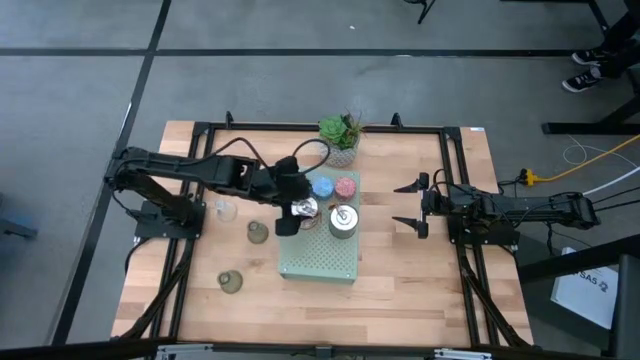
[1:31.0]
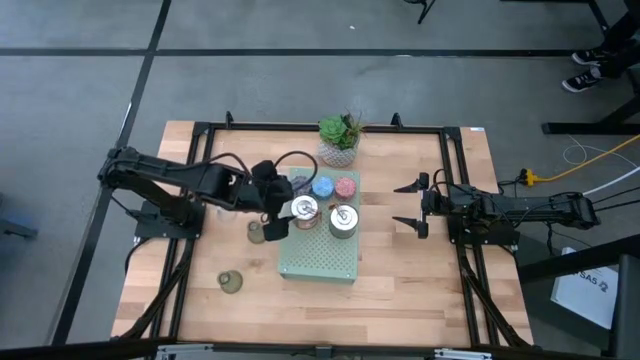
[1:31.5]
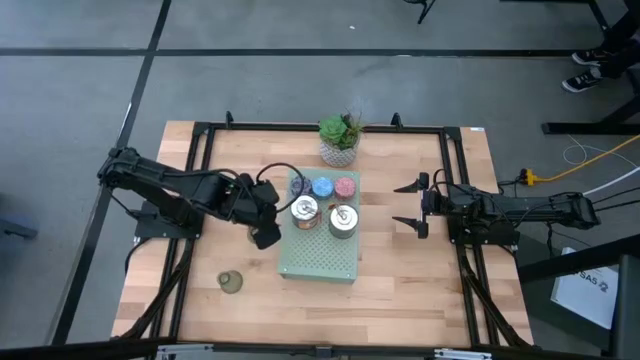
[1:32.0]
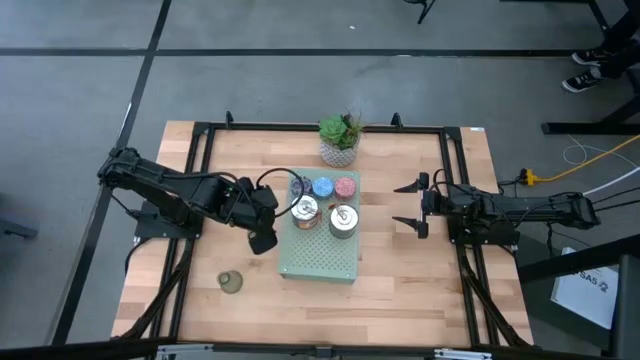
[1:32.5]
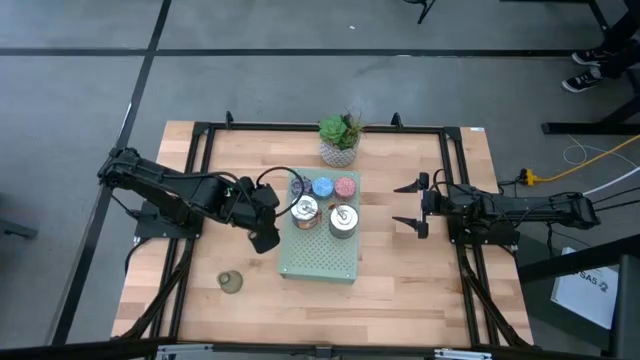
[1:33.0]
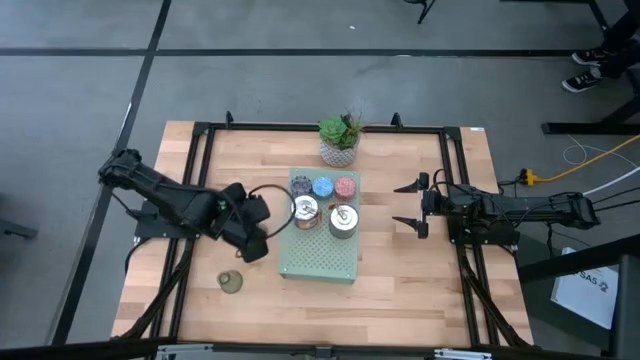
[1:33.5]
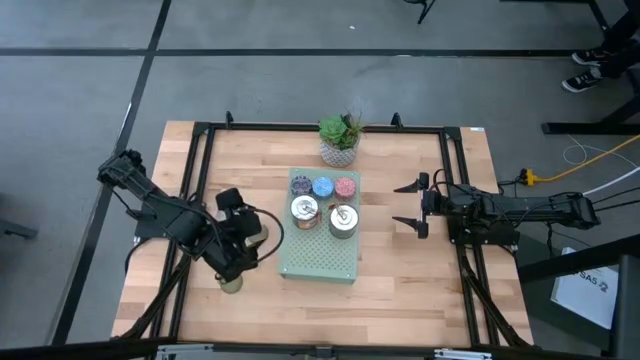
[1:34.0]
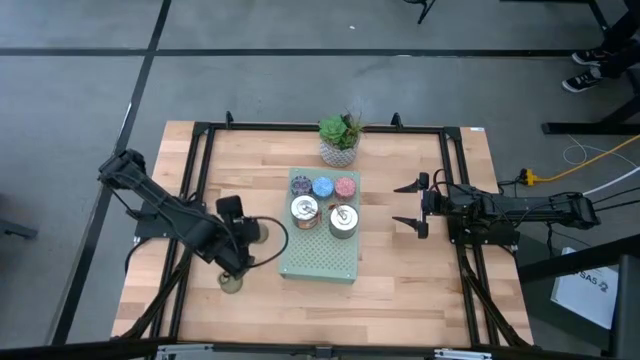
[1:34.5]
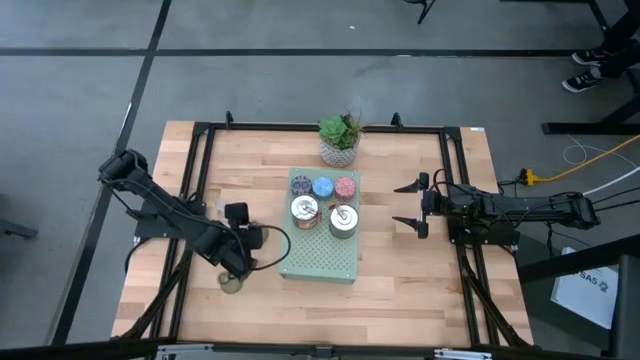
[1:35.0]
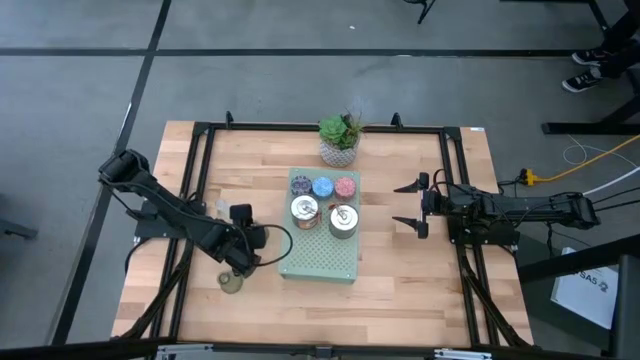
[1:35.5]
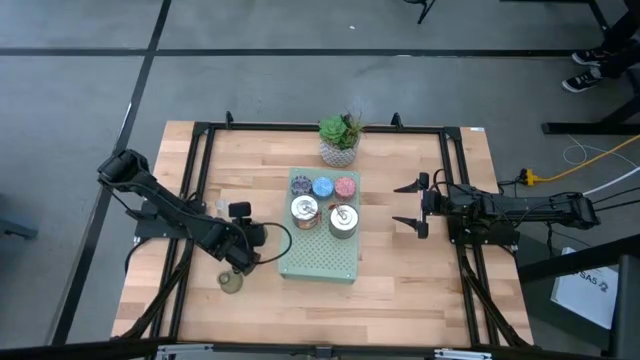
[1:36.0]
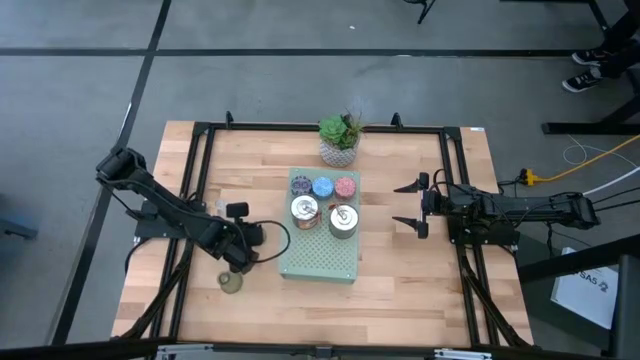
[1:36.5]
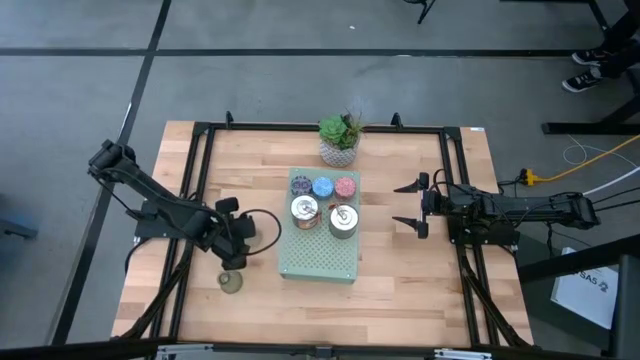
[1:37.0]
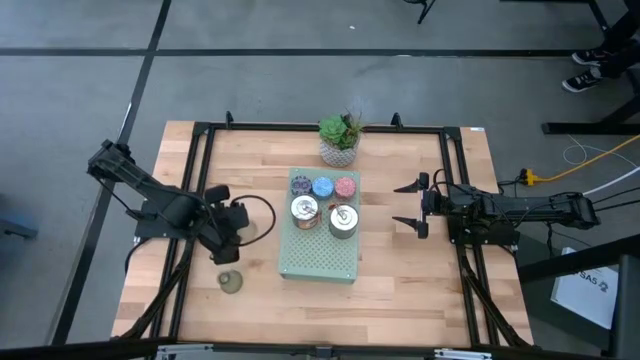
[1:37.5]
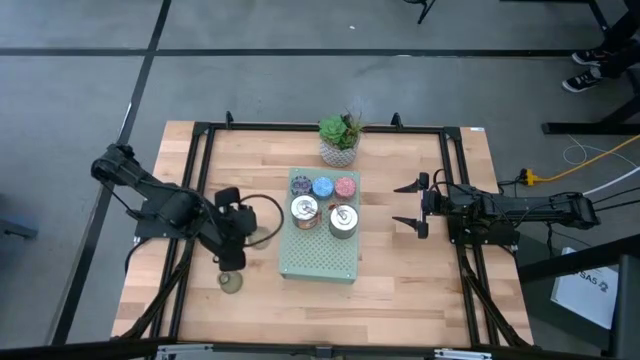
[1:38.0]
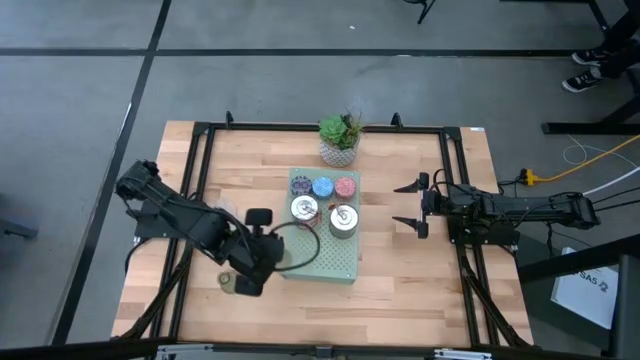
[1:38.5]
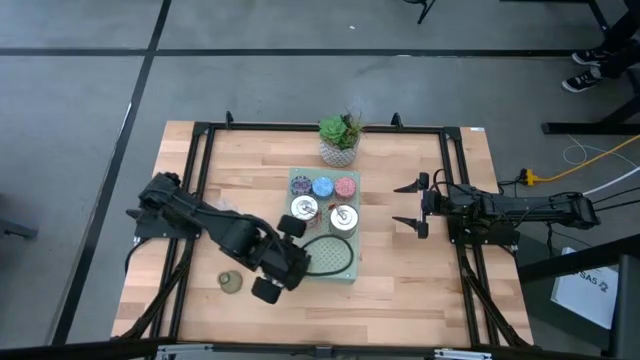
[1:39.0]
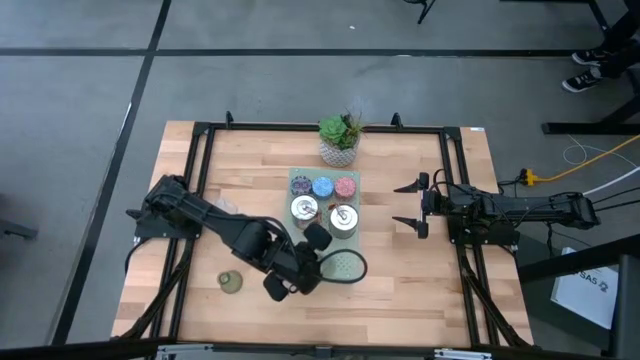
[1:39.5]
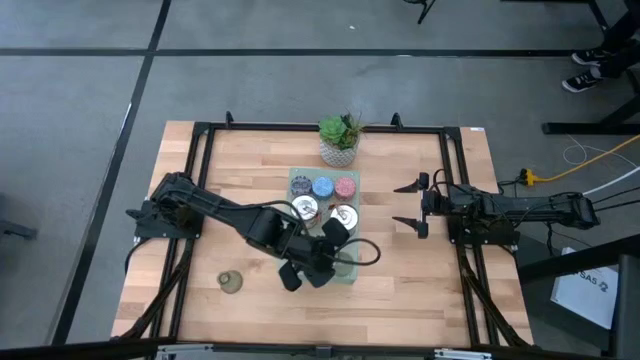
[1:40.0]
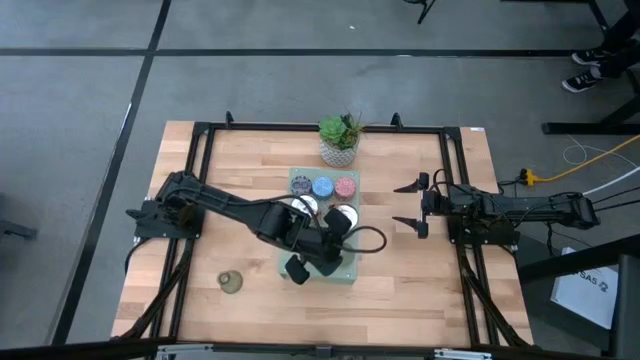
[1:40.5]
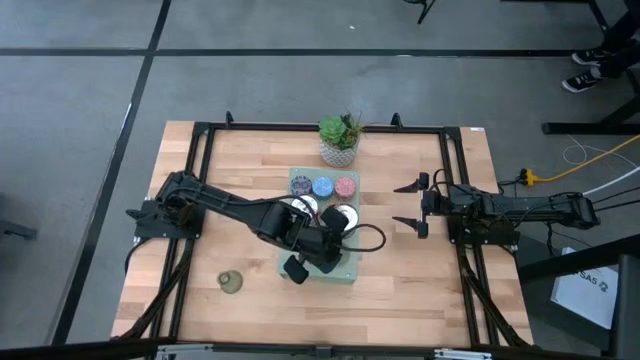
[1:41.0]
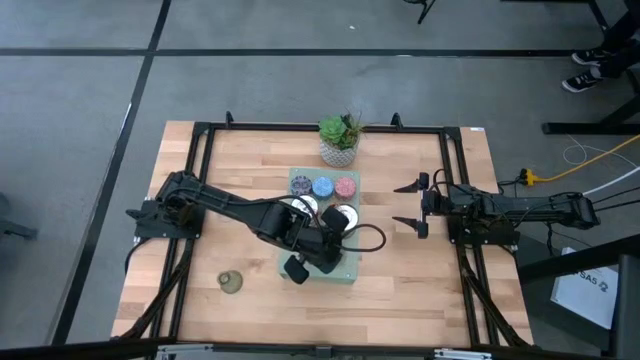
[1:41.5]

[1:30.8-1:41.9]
Task: Pick & Place candle stick holders
Put the top green vase candle holder on the shelf

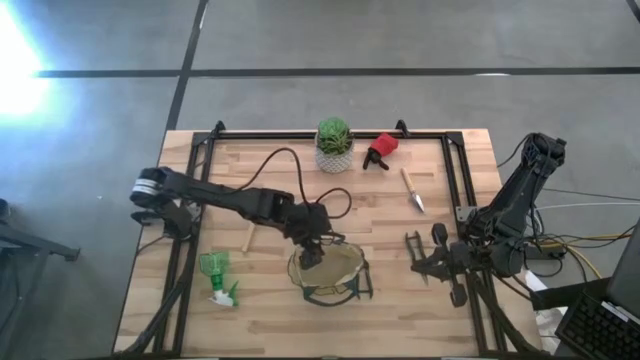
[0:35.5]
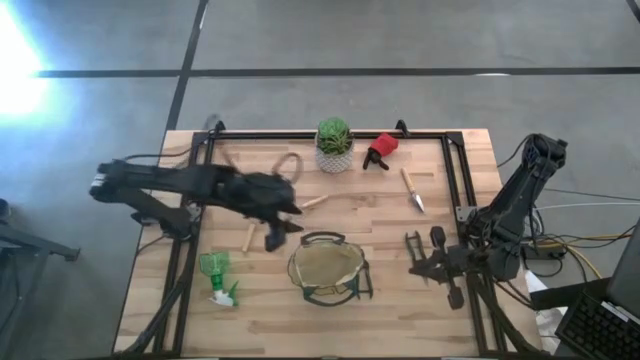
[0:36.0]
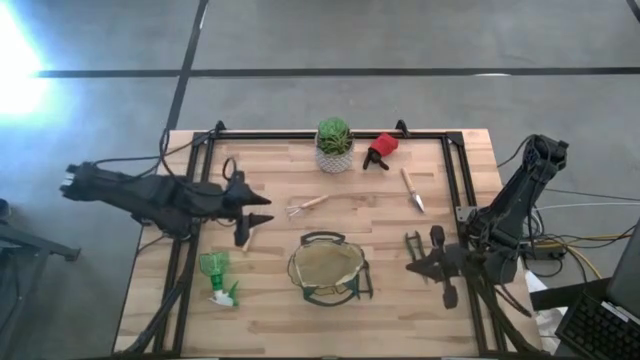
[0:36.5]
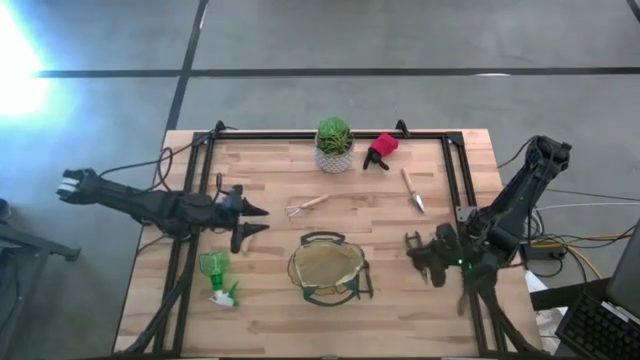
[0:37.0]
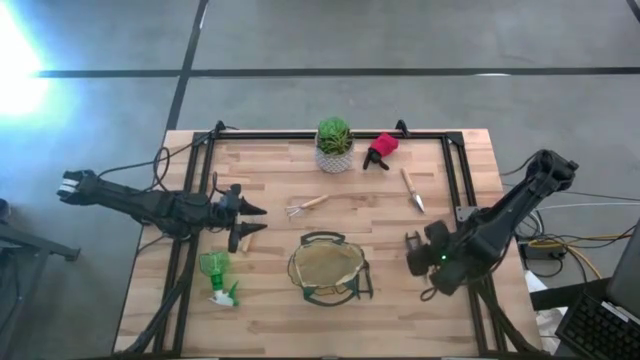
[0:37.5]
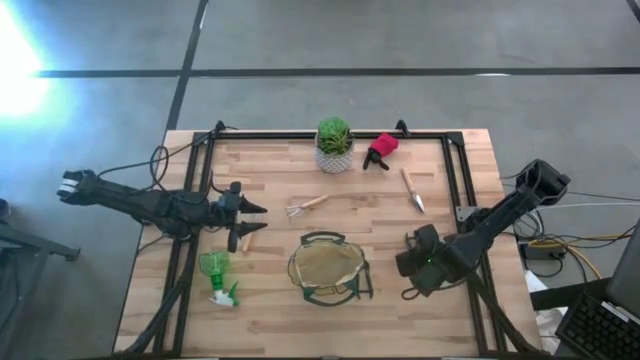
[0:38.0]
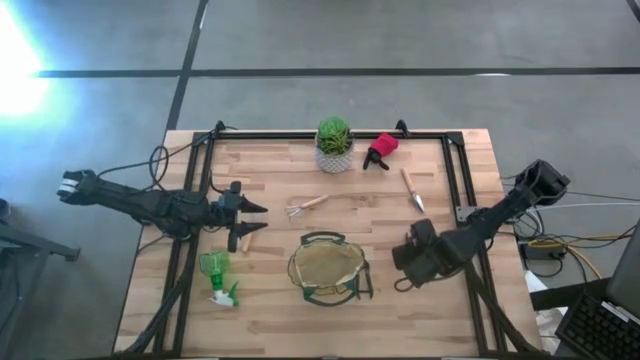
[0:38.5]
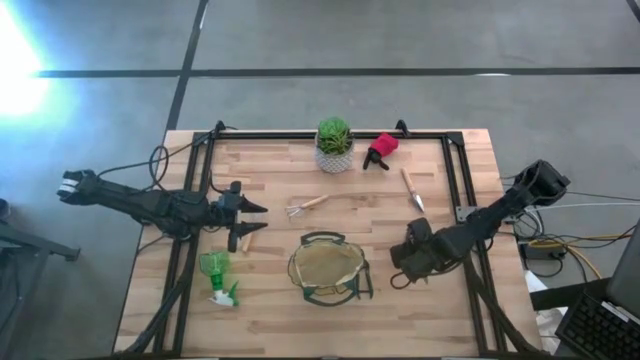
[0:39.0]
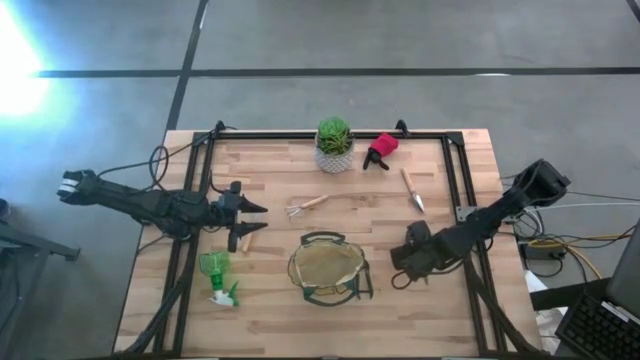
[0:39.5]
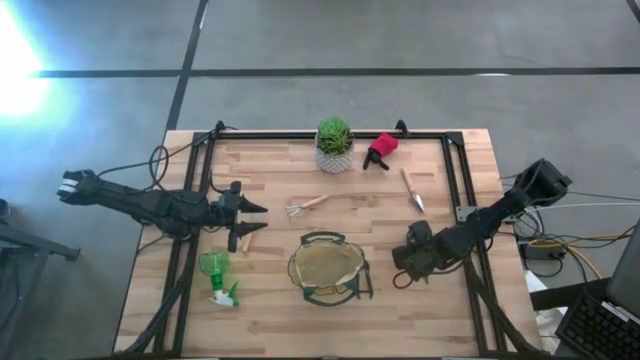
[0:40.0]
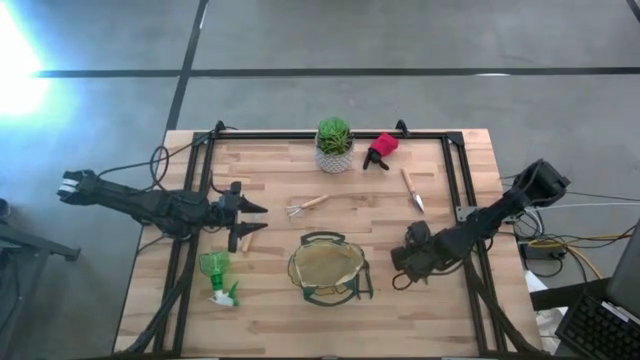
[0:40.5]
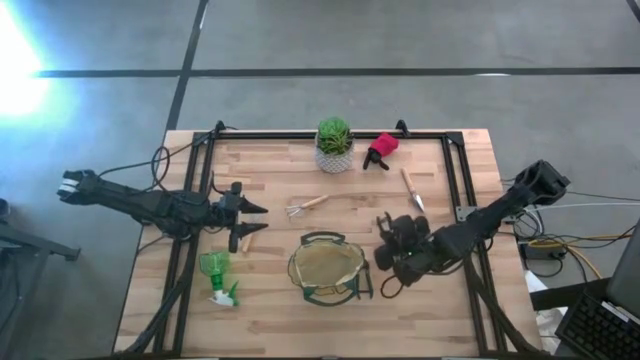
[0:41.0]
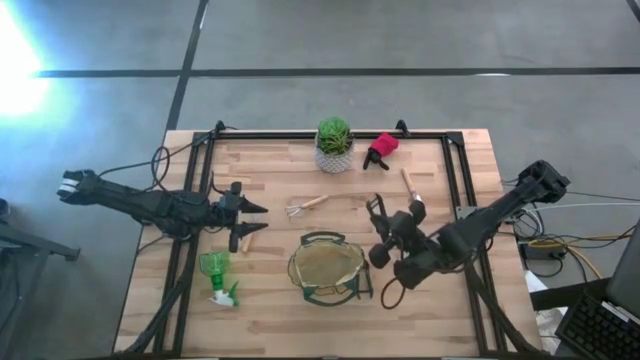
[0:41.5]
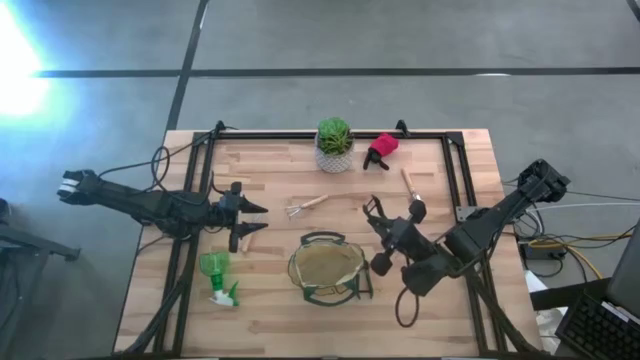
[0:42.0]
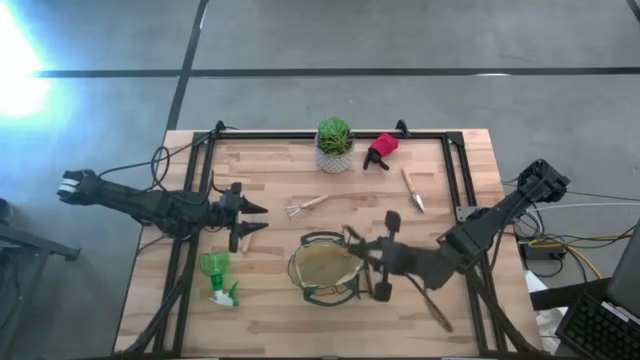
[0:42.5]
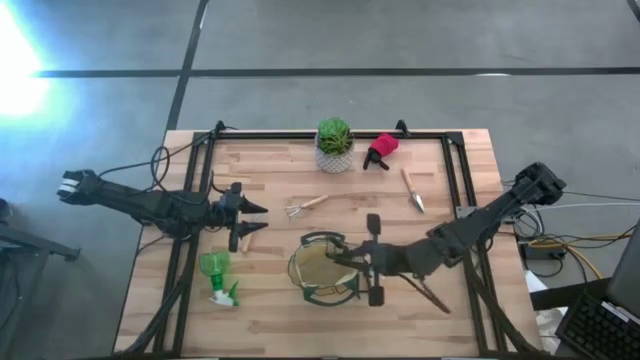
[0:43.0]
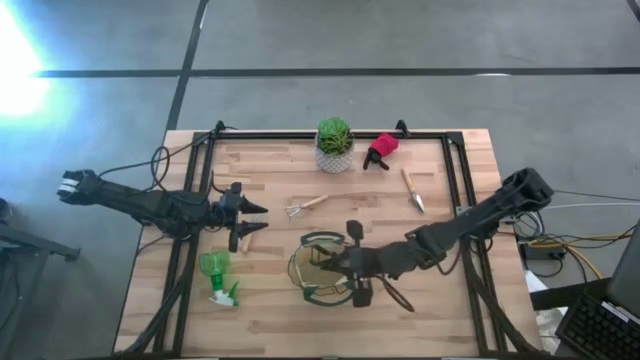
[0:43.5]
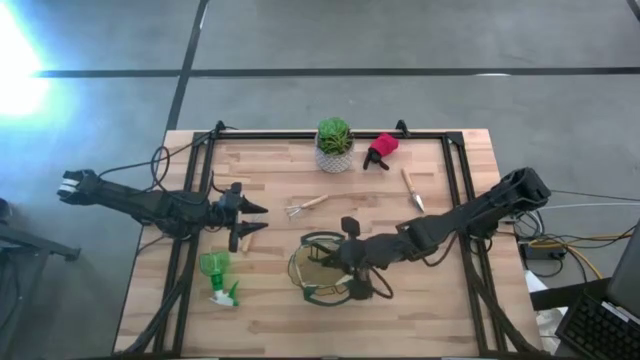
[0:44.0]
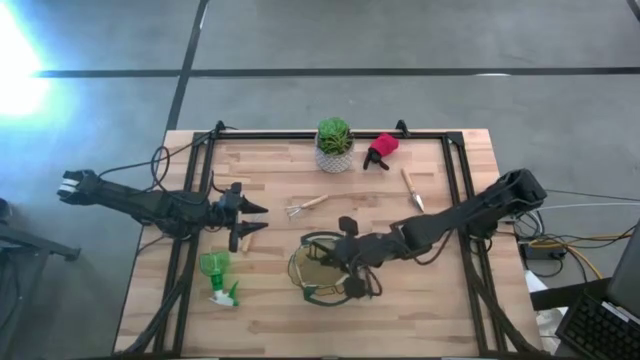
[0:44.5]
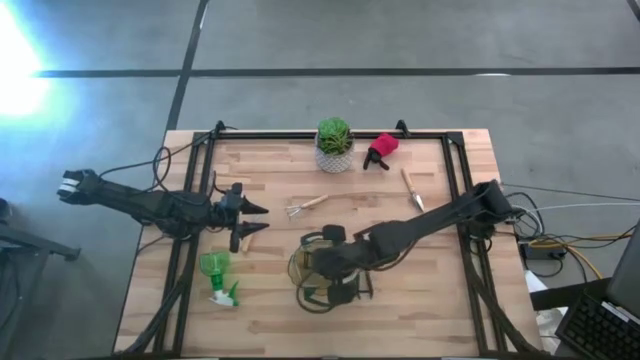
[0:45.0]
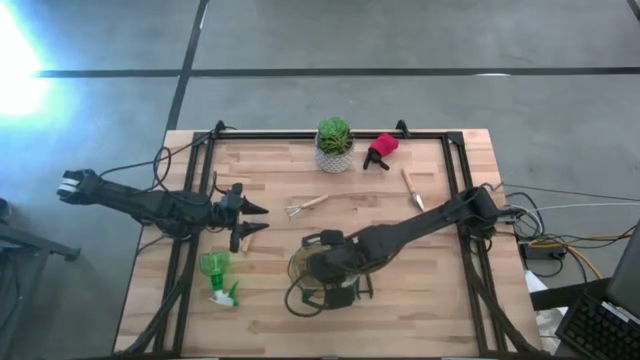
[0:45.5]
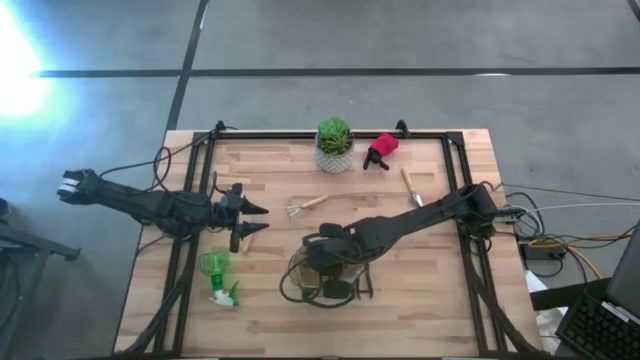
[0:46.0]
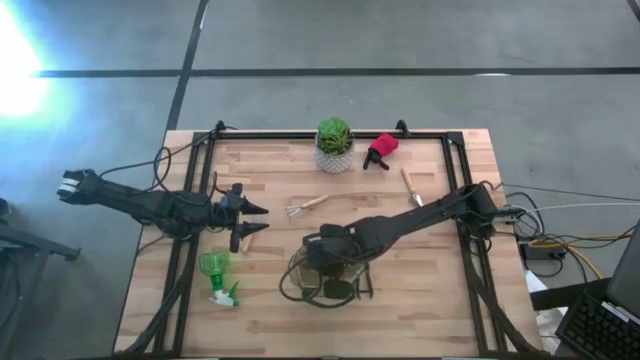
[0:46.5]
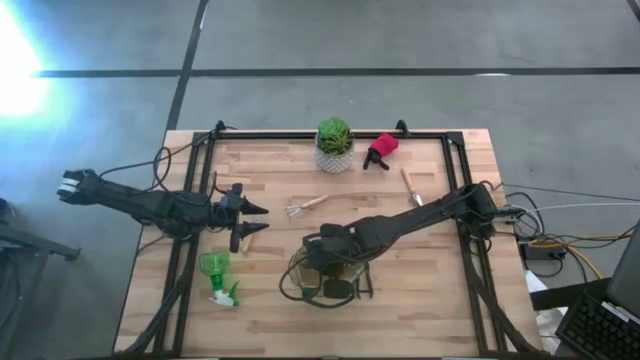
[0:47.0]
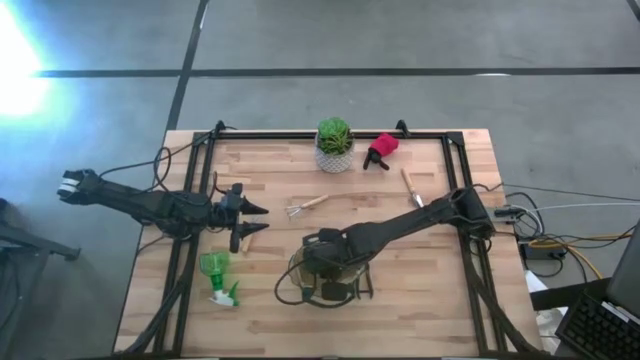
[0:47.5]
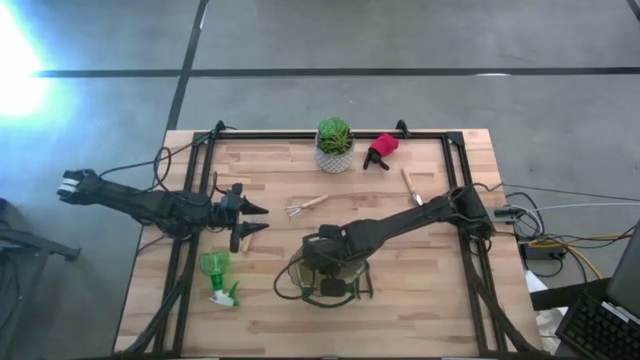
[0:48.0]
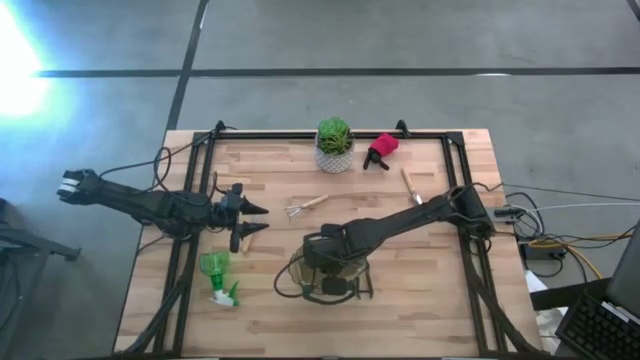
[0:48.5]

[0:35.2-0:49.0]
Task: Pick & Place Garden tools in Gardening bag
Put the right green shear scissors into the white gardening bag
